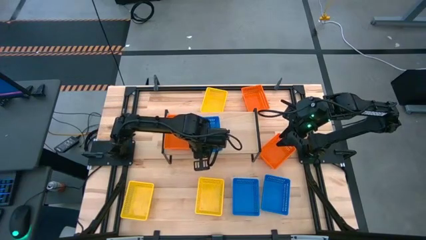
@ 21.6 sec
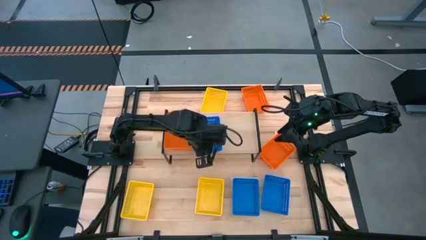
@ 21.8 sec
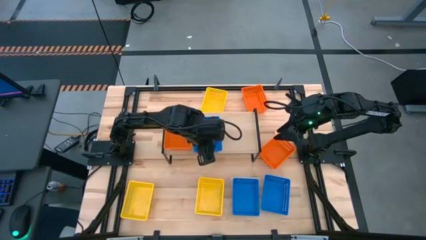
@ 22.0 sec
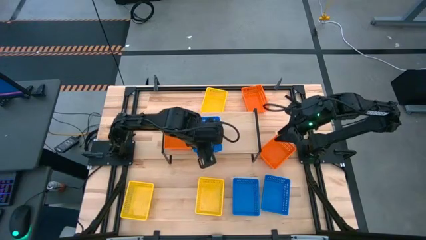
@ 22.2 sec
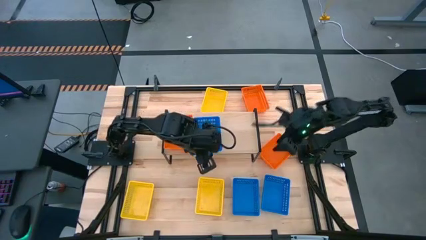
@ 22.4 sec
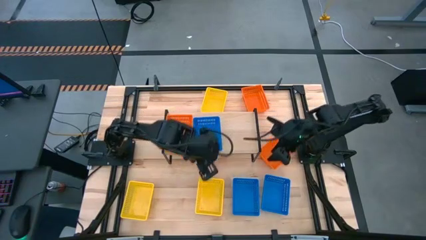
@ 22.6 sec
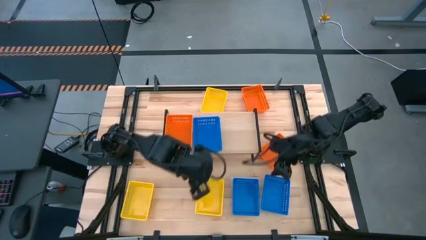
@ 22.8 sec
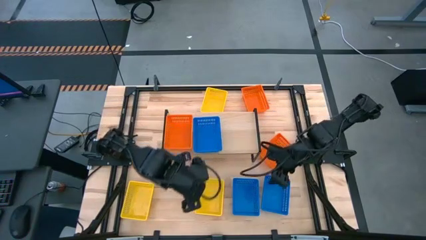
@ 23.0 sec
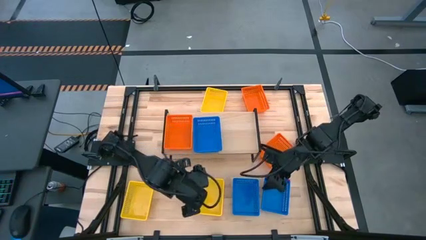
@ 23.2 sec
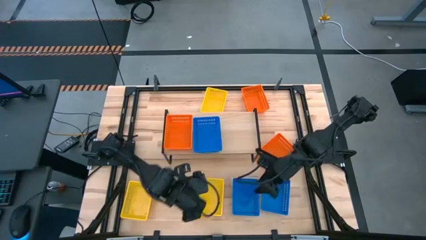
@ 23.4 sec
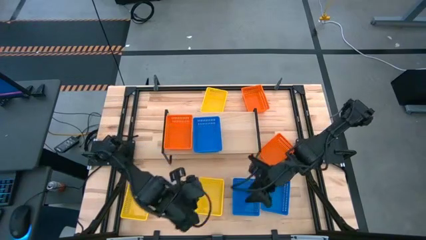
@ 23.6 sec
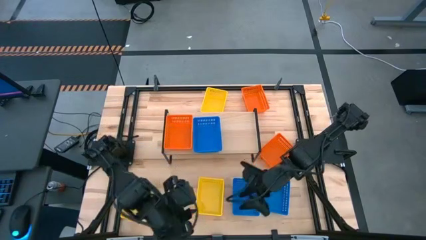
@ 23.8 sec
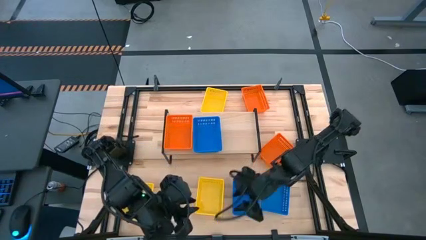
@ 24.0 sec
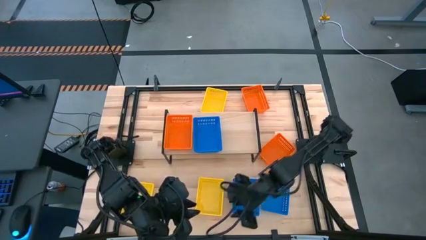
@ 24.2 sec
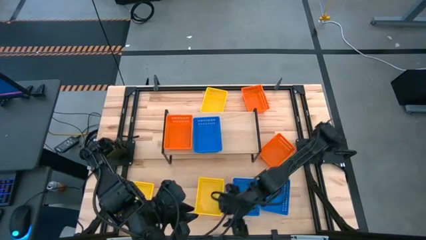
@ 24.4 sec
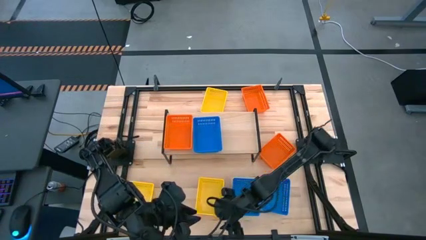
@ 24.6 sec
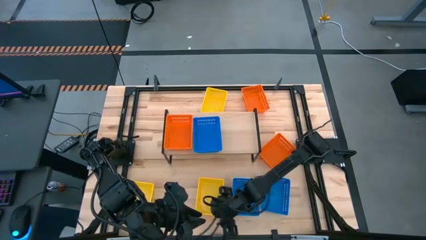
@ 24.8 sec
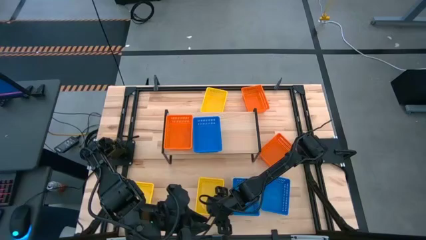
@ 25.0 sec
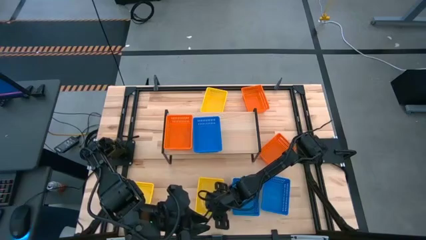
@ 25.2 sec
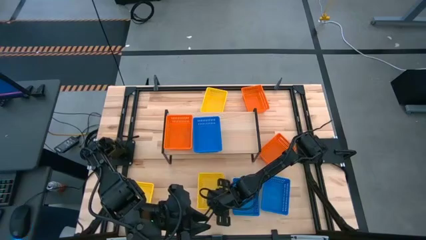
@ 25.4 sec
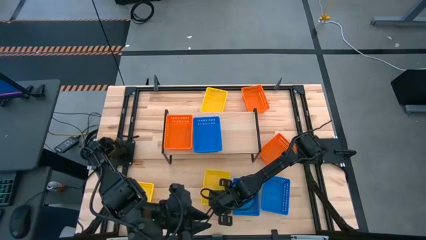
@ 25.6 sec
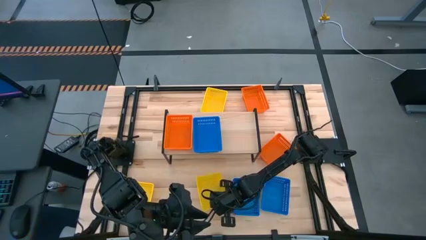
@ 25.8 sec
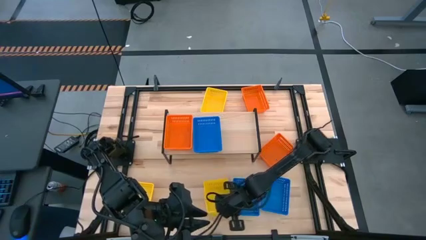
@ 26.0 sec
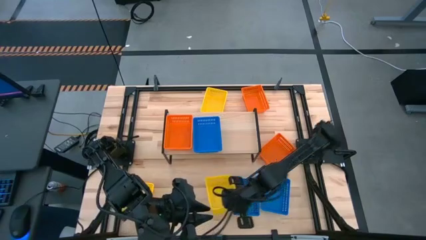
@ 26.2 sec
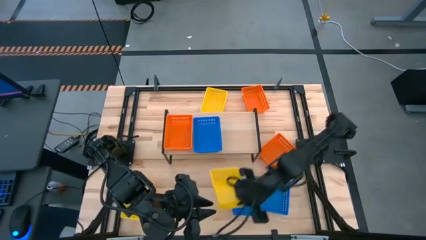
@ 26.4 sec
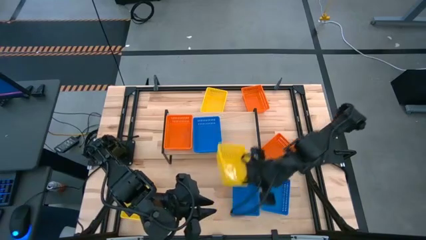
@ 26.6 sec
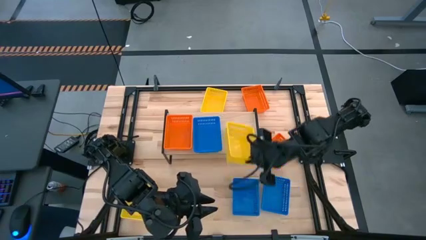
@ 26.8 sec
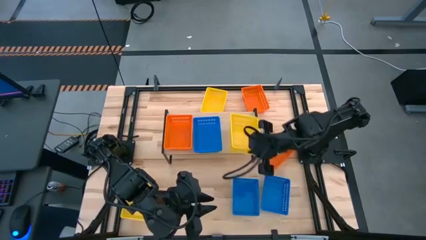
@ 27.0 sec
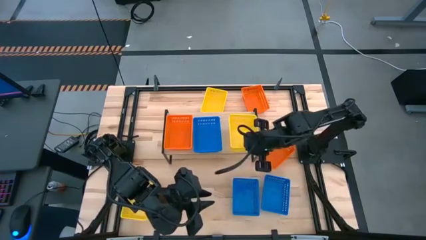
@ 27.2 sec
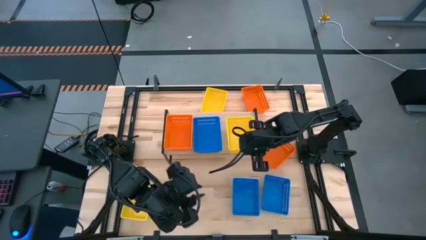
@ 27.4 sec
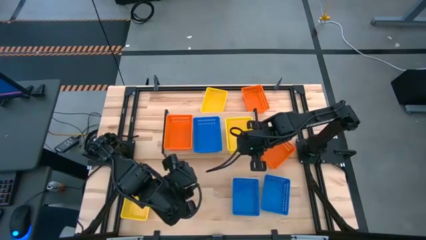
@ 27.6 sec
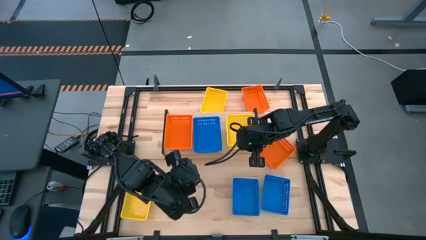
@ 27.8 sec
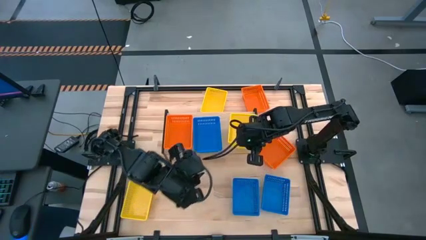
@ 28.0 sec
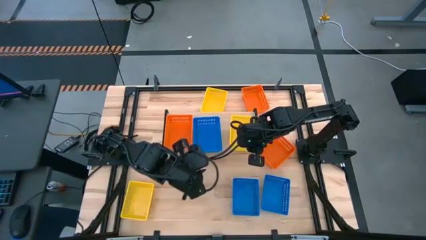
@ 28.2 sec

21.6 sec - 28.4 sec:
Task: Stack baskets on shelf by color
Put the bottom right yellow bin on the shelf

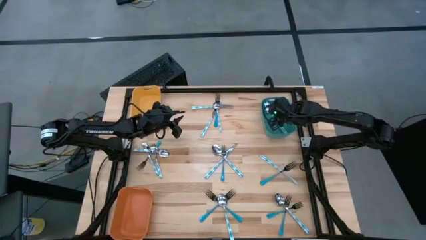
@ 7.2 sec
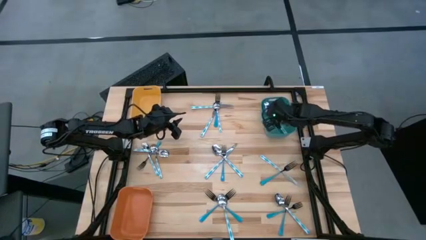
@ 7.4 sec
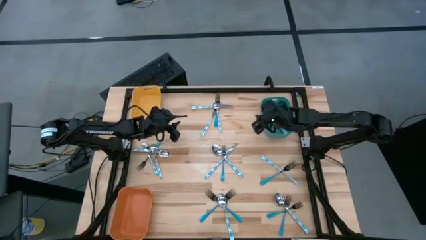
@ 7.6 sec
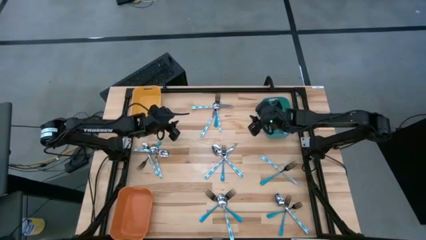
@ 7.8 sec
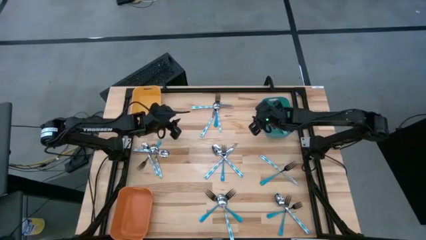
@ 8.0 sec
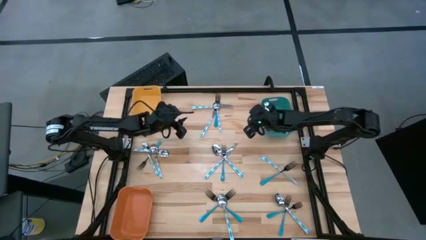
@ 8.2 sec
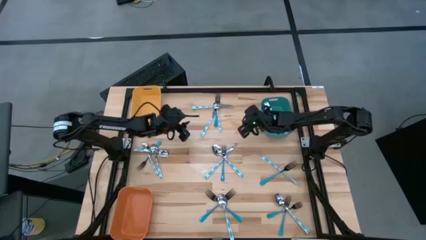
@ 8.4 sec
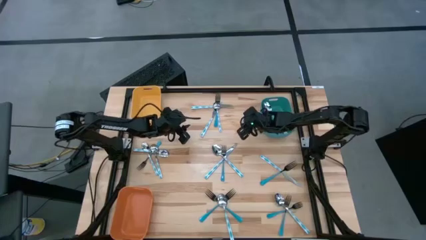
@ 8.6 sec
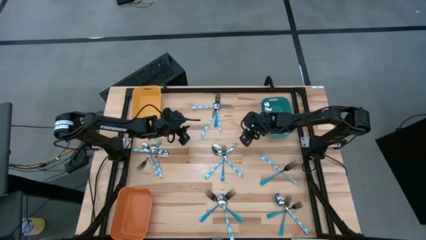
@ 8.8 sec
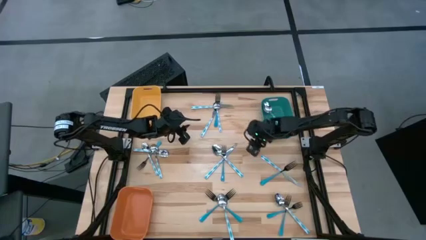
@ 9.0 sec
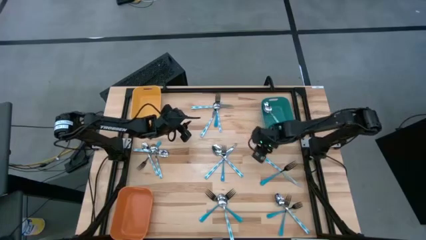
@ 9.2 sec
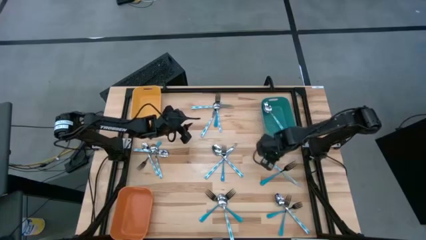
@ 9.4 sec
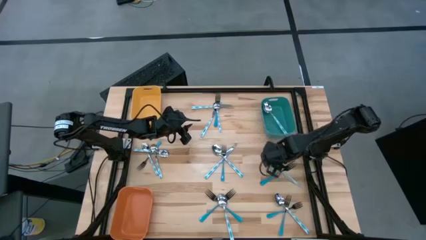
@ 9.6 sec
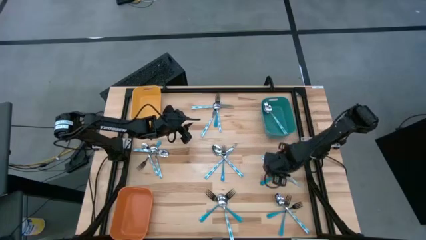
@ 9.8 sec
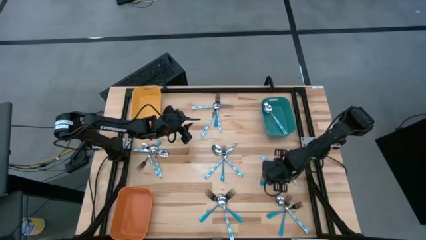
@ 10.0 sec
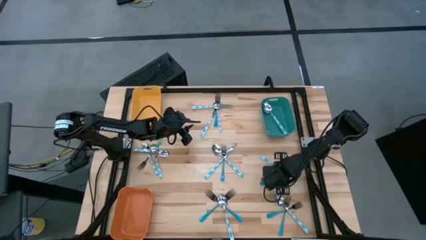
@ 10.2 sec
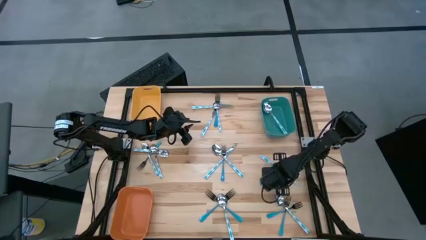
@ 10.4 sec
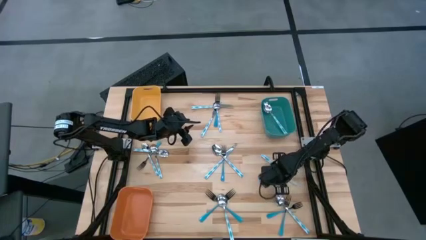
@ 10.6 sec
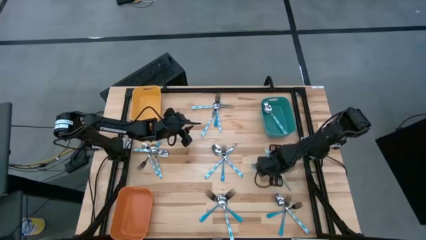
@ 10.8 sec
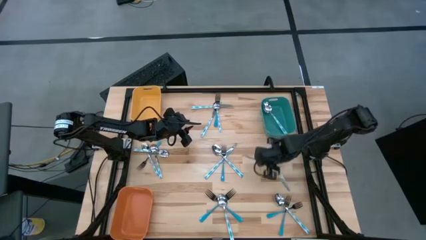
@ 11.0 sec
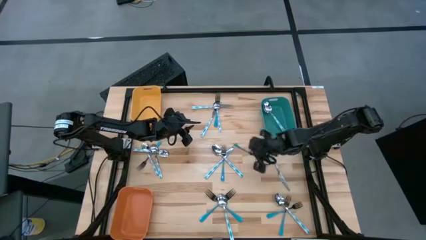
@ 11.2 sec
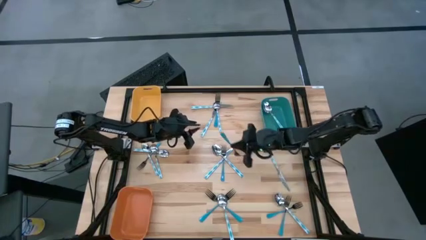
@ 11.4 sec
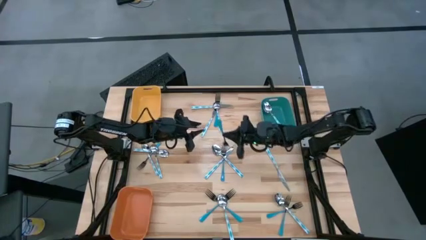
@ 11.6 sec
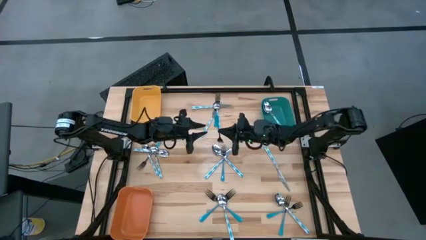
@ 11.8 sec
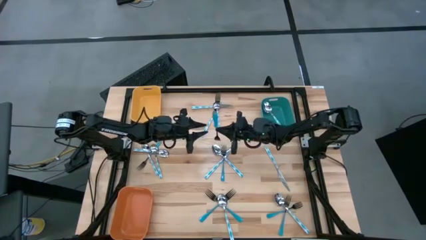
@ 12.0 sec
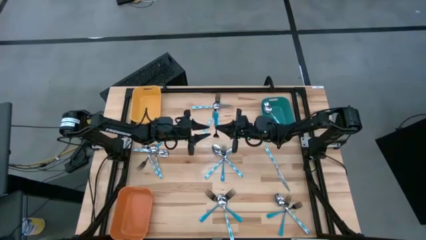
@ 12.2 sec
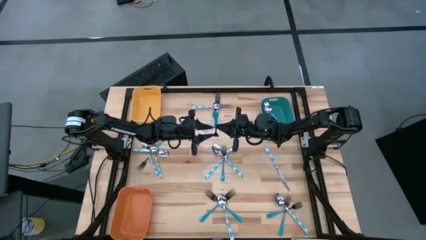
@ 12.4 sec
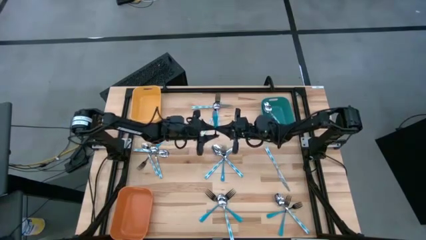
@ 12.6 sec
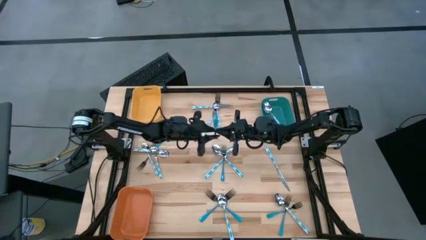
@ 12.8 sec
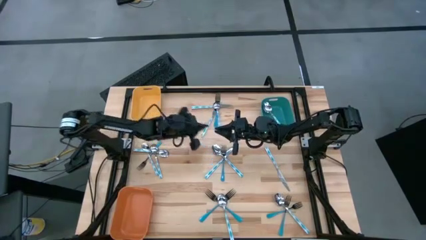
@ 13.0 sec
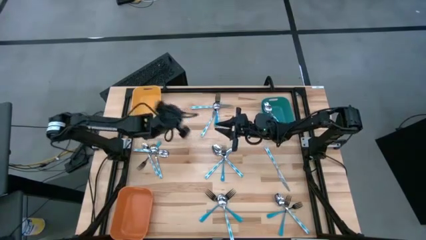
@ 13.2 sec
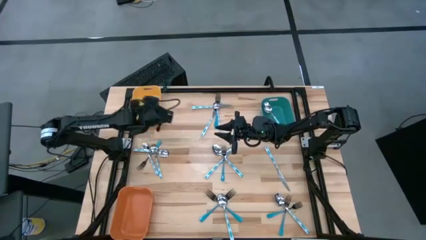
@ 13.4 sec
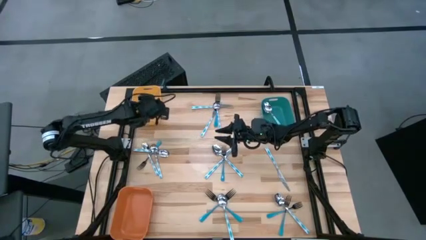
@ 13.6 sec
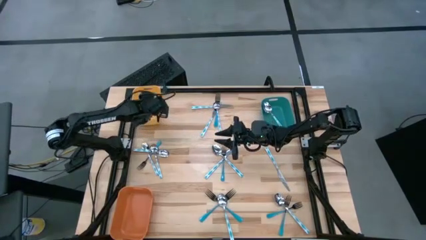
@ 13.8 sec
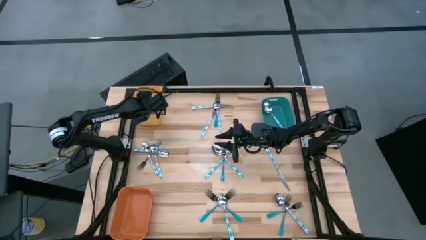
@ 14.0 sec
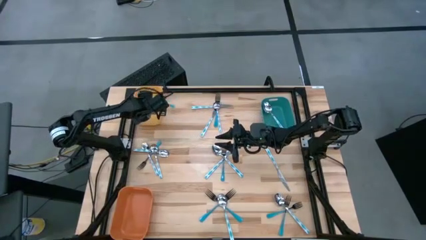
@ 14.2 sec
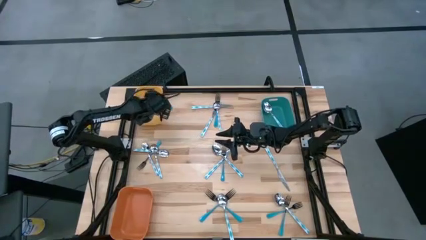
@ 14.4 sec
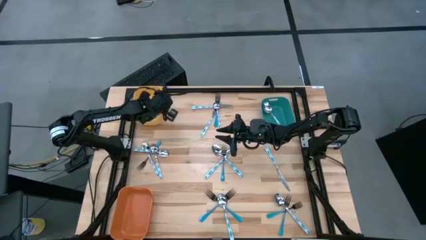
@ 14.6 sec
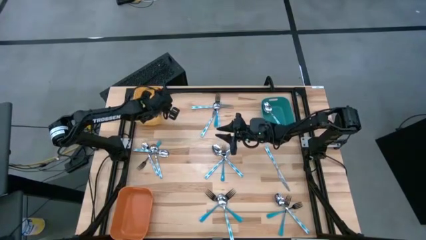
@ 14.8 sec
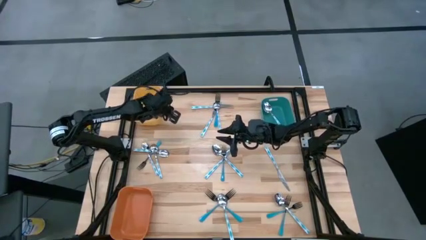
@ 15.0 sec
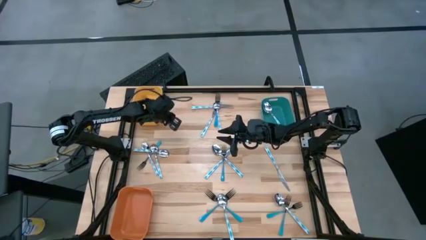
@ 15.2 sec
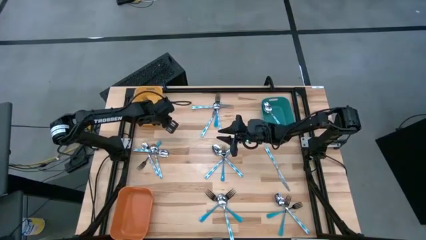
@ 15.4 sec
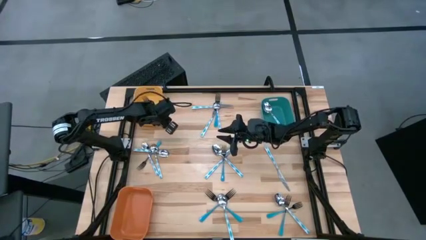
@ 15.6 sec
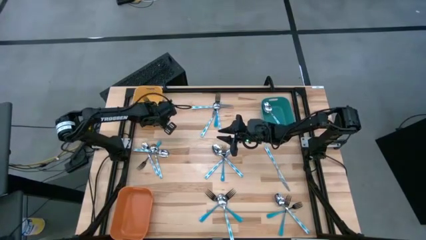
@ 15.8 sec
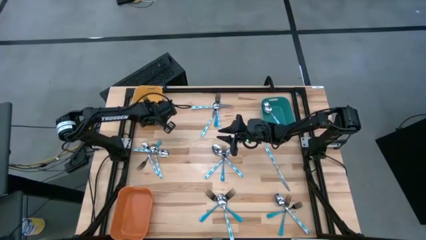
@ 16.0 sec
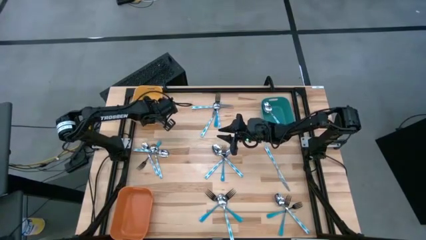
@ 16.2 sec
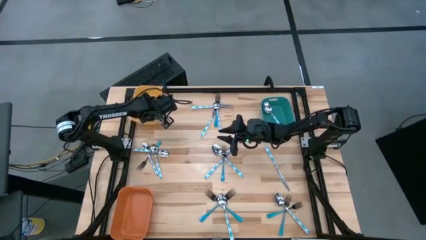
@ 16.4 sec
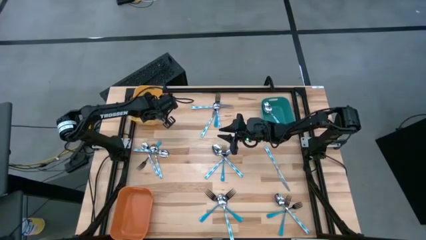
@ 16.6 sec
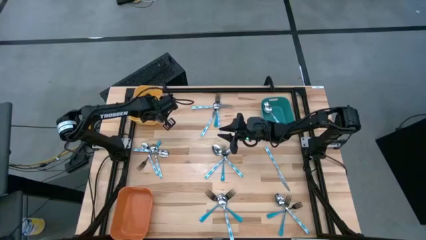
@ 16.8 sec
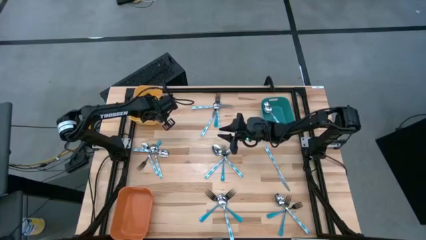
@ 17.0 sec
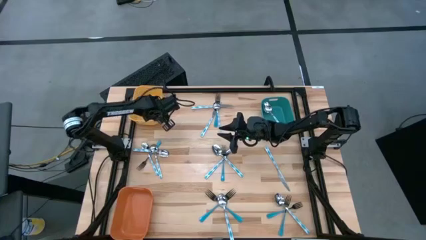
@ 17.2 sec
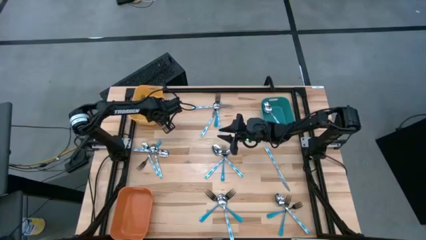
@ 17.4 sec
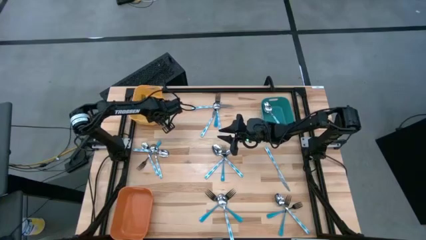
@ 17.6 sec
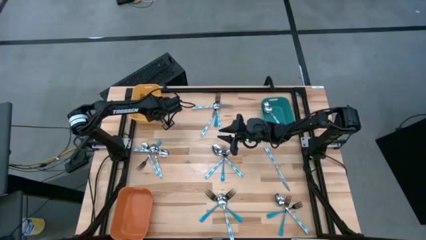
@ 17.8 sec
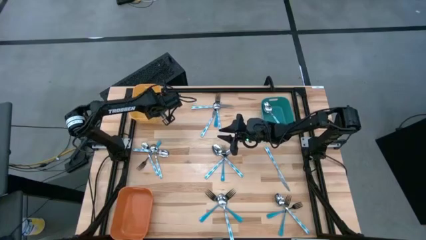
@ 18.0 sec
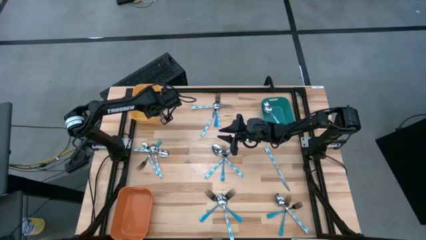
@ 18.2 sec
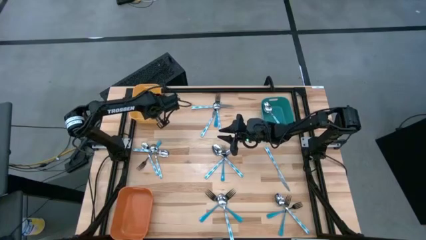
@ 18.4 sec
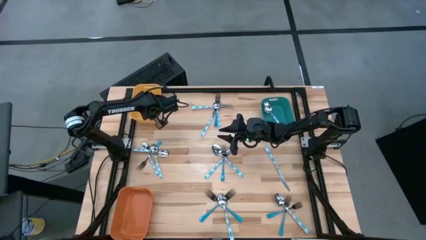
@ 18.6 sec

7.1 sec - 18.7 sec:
Task: Sort silverware by color (type)
Put the blue fork into the yellow bin
